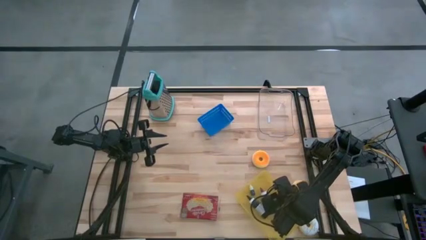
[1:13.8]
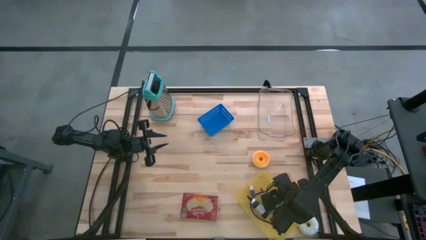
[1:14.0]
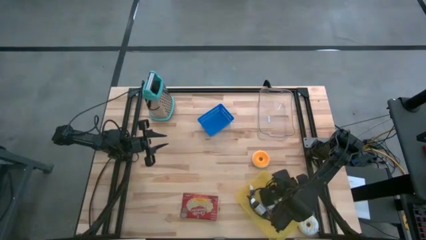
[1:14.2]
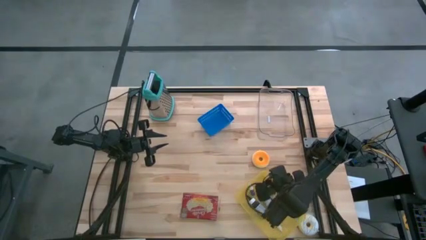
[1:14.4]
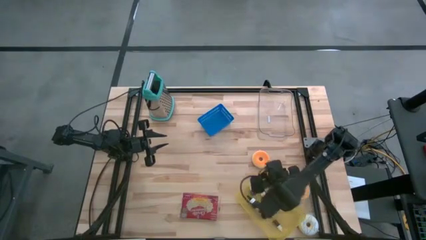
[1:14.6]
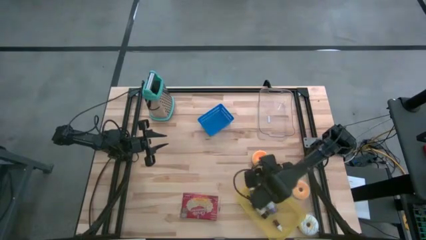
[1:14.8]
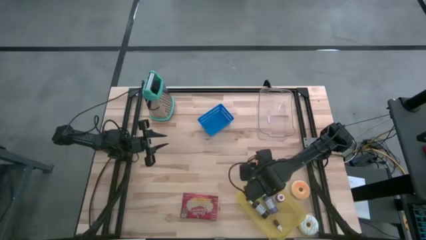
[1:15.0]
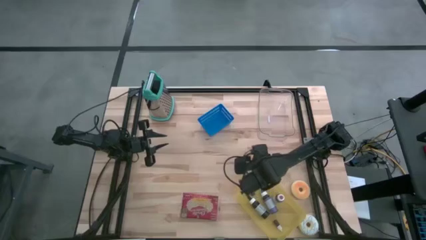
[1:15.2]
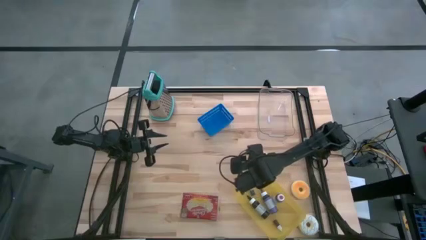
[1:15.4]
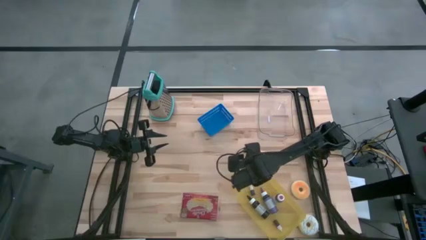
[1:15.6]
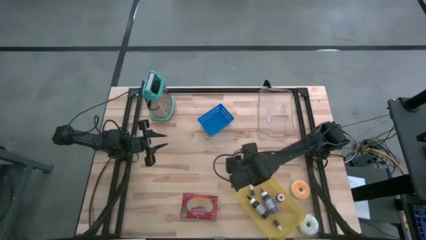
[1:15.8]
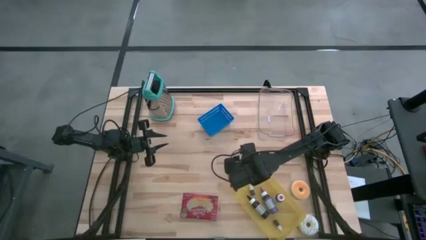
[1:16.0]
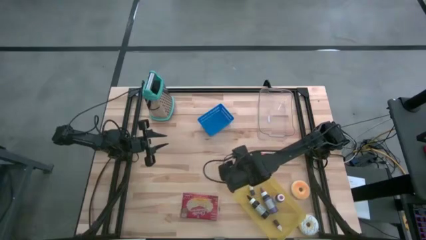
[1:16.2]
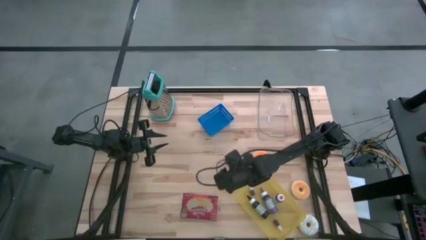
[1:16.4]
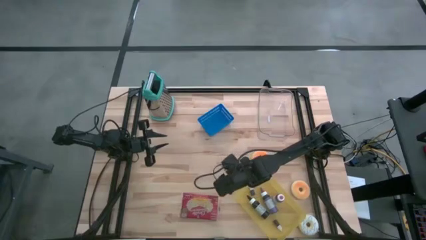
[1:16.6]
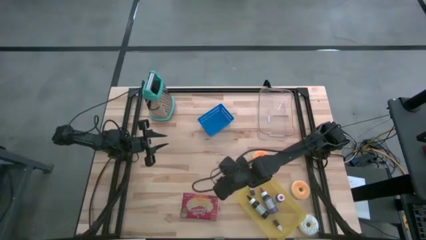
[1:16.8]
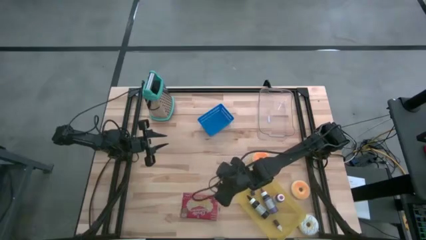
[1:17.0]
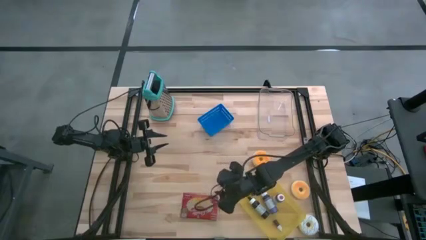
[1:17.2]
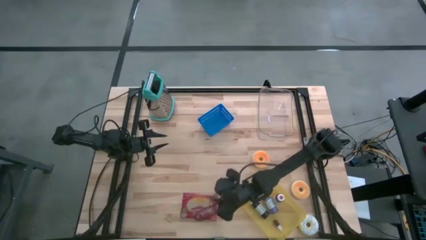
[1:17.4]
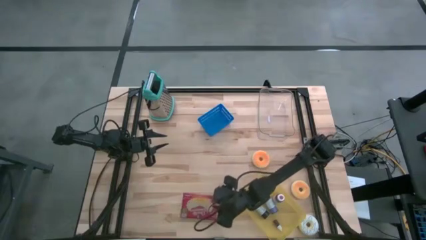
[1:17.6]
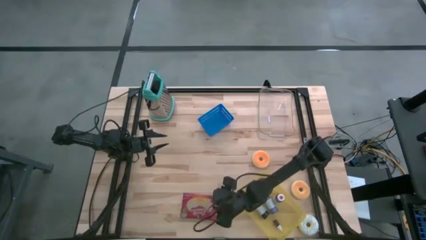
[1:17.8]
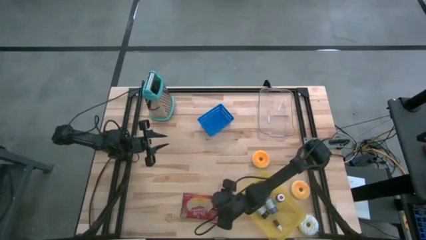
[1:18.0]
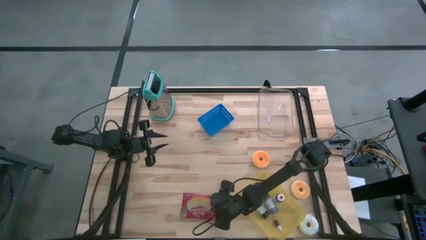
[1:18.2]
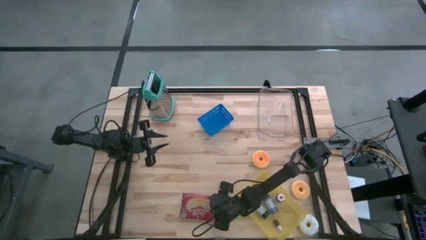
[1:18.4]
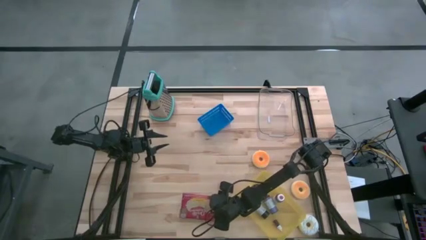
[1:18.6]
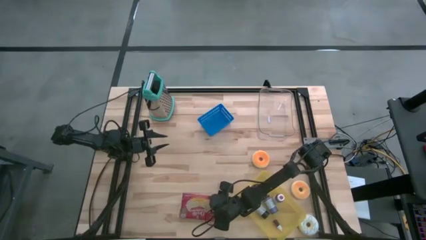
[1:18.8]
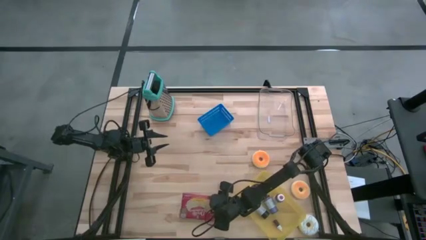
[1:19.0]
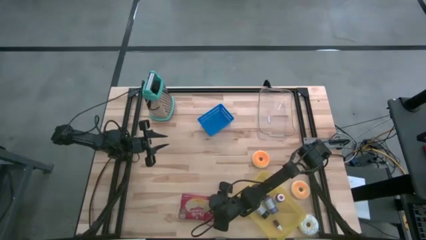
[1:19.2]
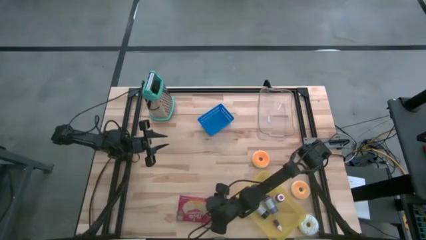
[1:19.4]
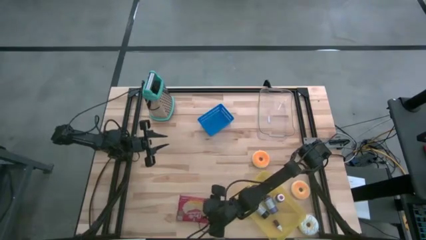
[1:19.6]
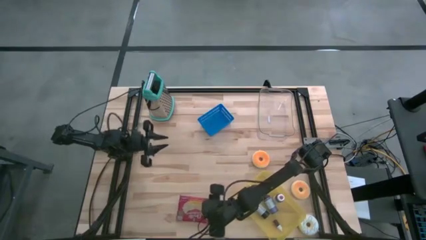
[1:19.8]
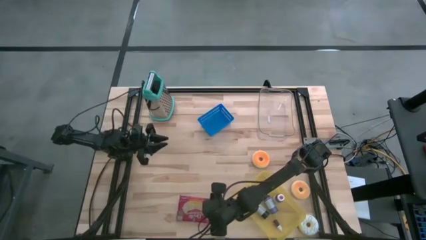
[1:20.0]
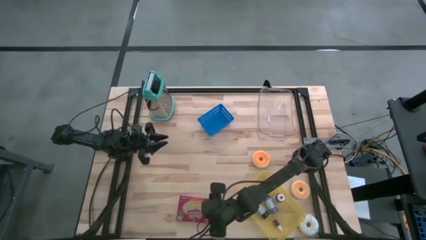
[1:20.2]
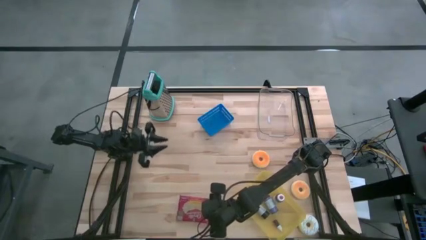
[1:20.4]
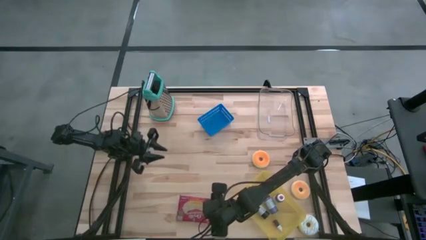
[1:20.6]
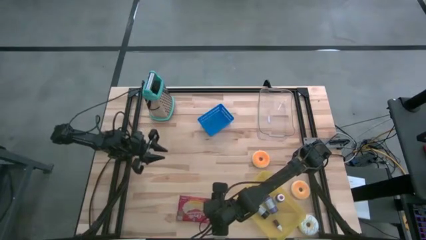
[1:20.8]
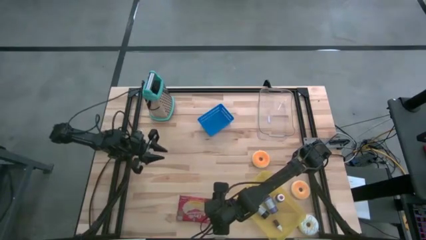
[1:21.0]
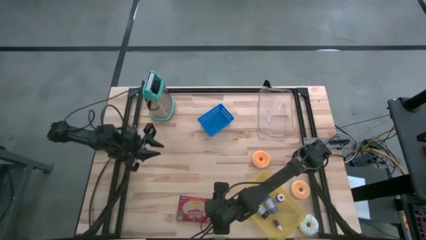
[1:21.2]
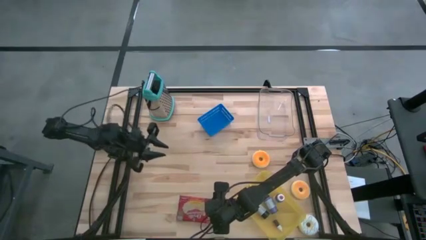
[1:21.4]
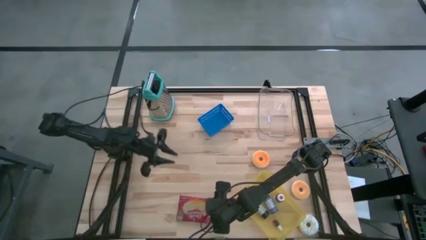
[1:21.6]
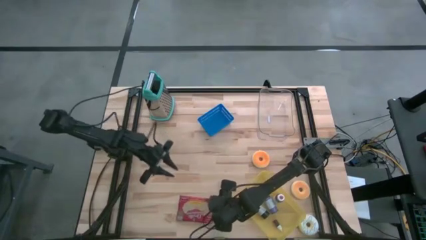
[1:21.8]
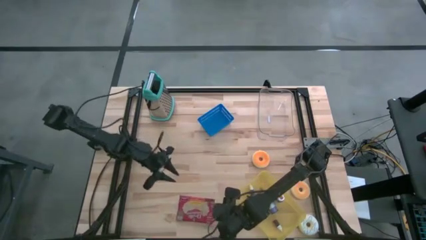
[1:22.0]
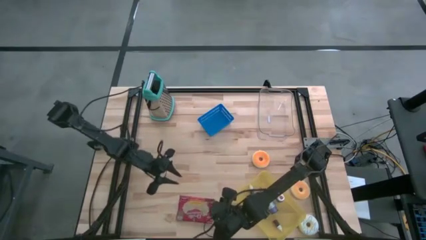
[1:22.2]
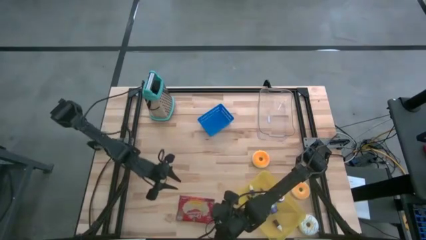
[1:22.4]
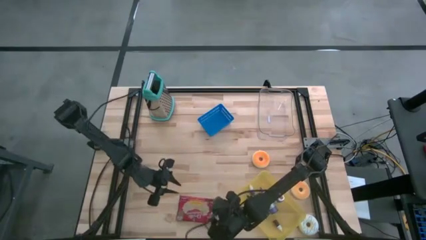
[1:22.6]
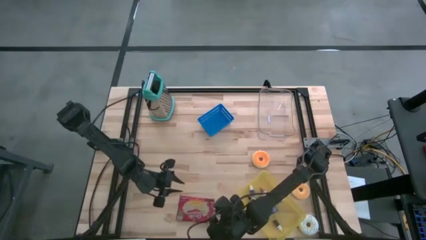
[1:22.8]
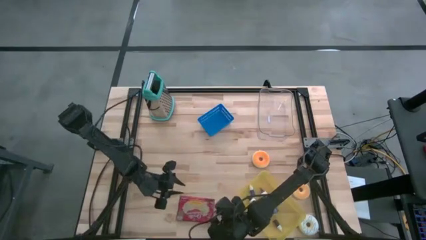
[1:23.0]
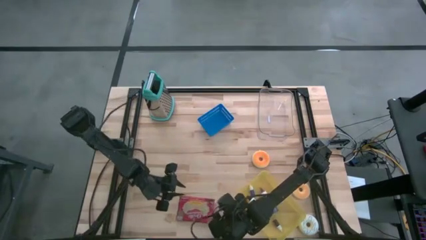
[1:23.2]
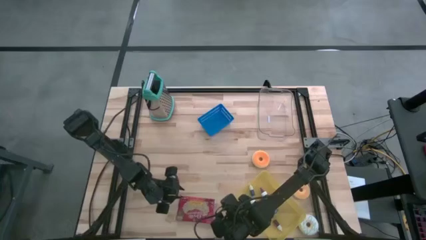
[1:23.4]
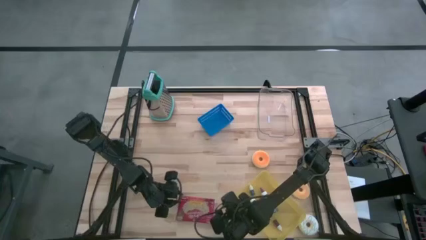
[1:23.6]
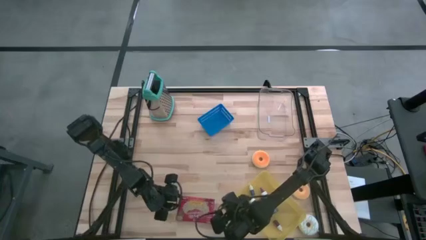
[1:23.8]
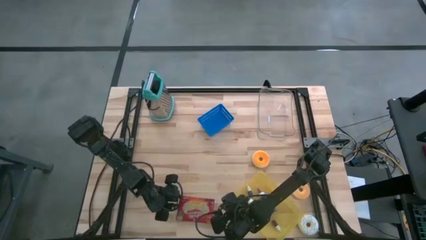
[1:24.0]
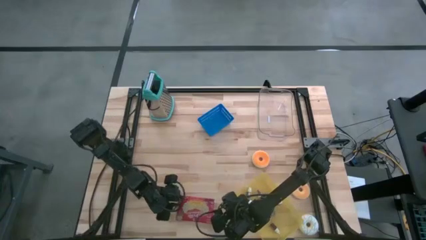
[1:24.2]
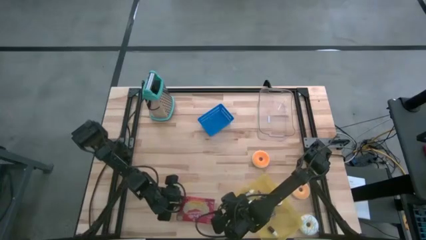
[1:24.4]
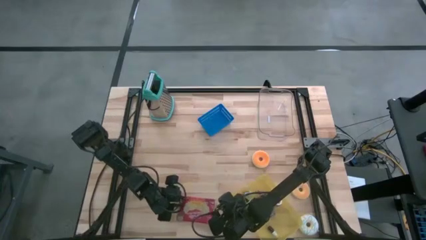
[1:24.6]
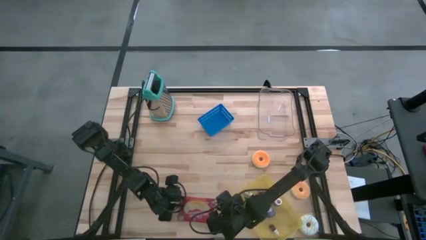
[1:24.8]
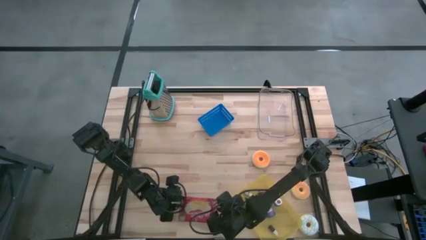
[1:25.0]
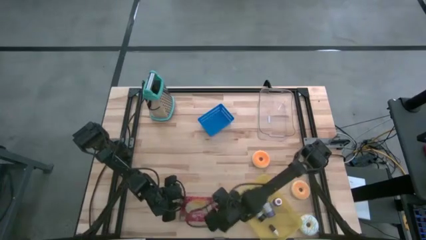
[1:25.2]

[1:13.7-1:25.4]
Task: Pick & Place Food Item
Put the popcorn butter into the transparent bin

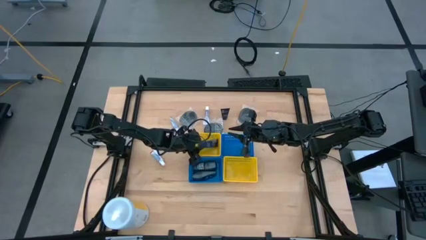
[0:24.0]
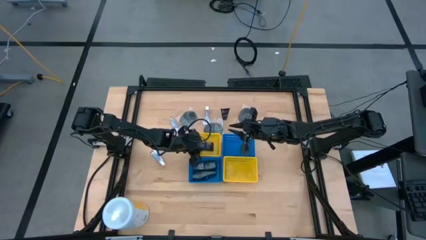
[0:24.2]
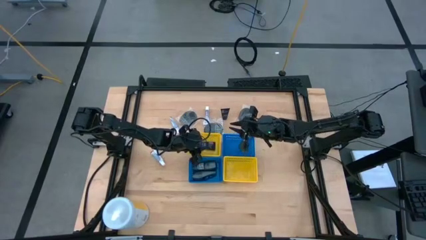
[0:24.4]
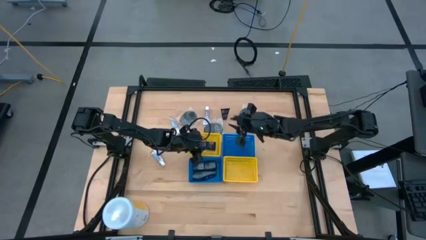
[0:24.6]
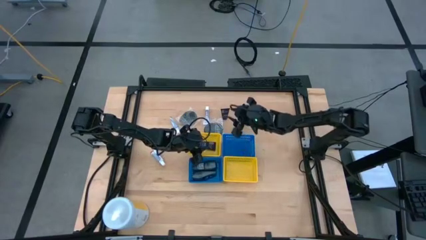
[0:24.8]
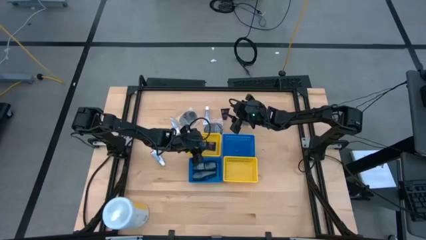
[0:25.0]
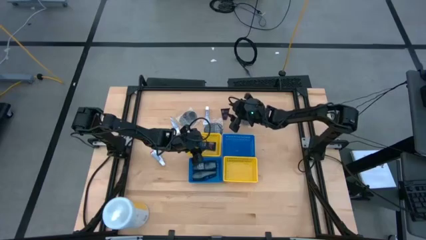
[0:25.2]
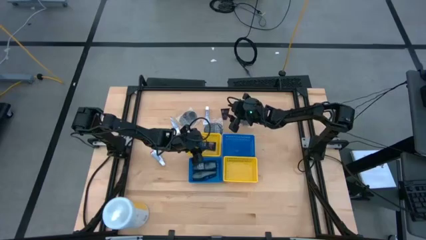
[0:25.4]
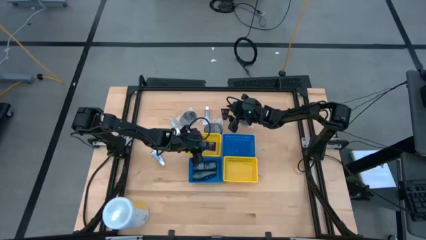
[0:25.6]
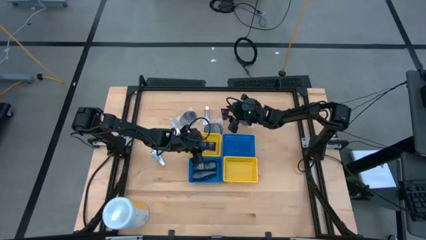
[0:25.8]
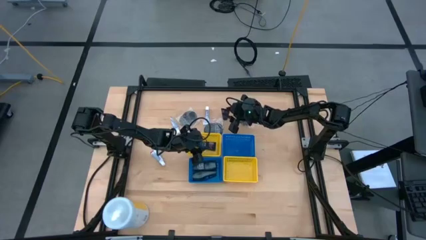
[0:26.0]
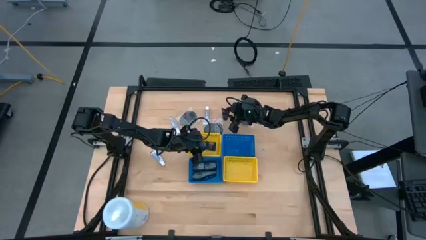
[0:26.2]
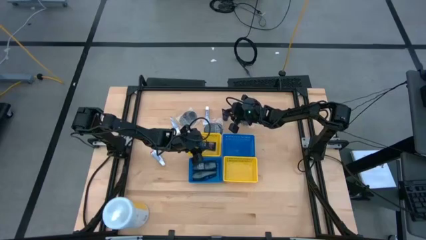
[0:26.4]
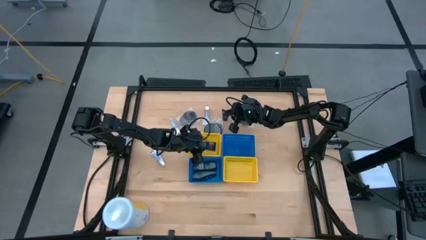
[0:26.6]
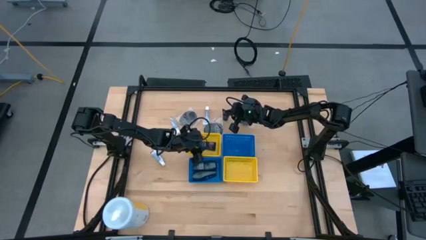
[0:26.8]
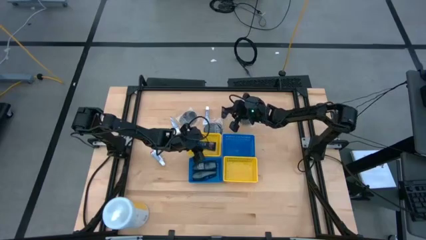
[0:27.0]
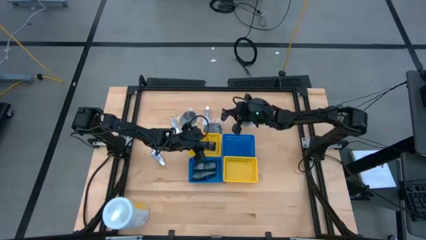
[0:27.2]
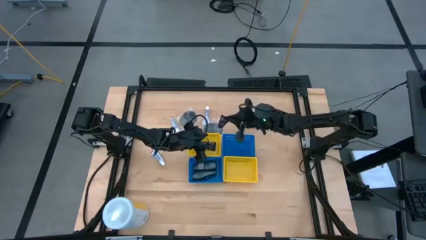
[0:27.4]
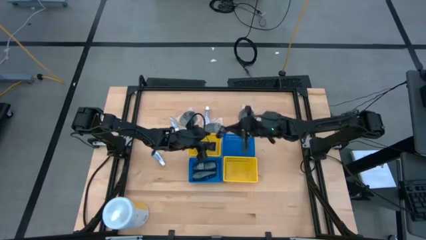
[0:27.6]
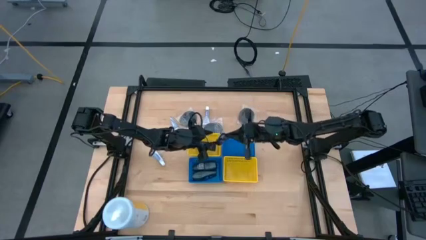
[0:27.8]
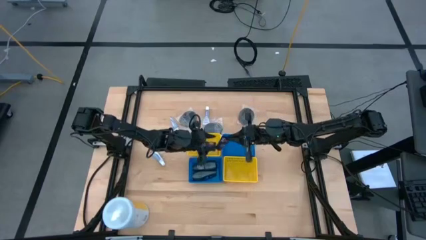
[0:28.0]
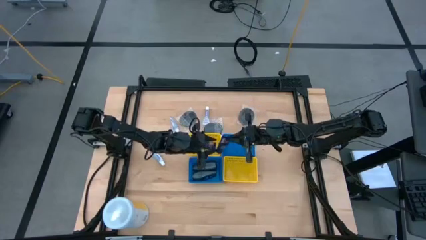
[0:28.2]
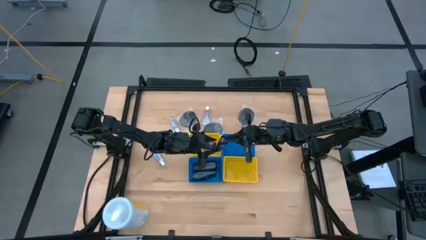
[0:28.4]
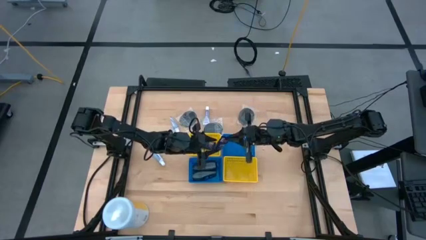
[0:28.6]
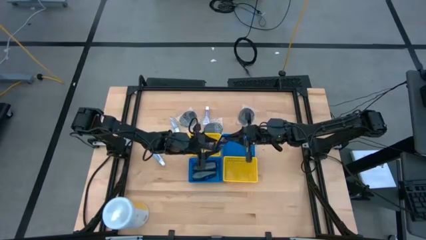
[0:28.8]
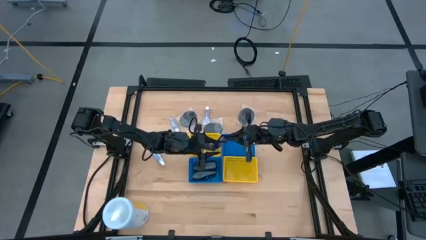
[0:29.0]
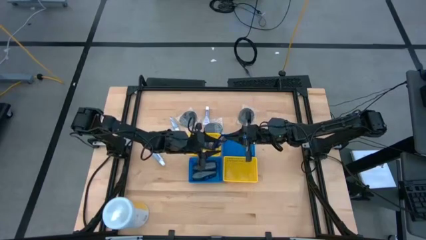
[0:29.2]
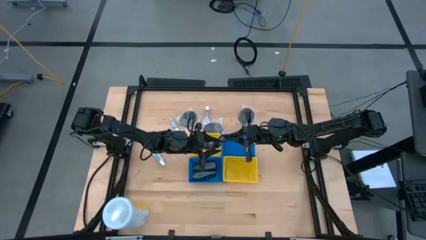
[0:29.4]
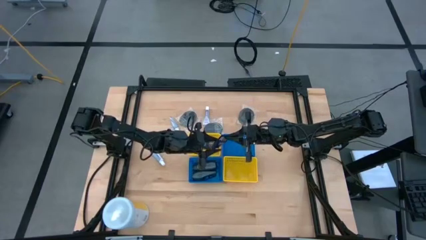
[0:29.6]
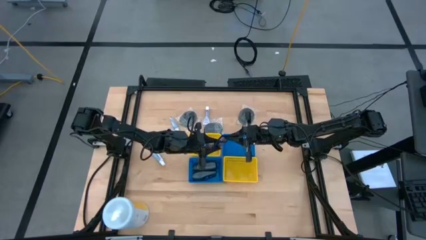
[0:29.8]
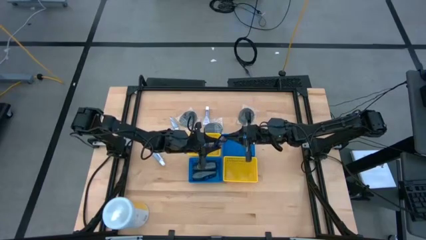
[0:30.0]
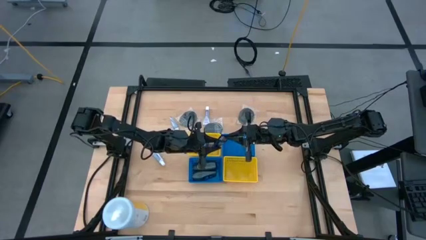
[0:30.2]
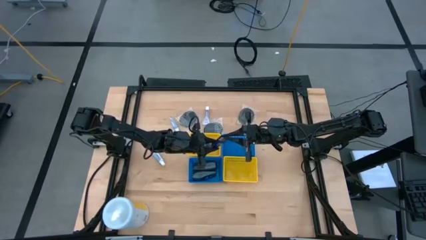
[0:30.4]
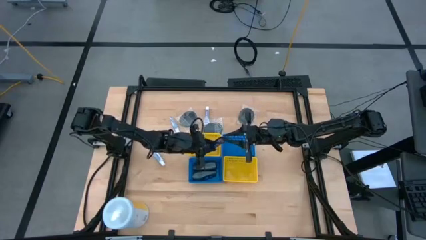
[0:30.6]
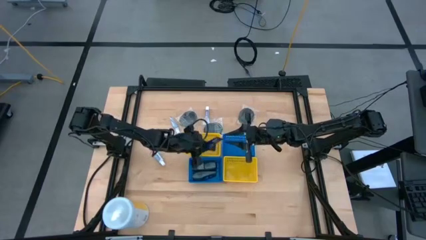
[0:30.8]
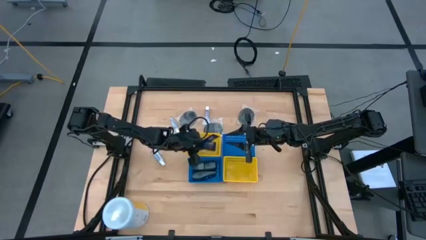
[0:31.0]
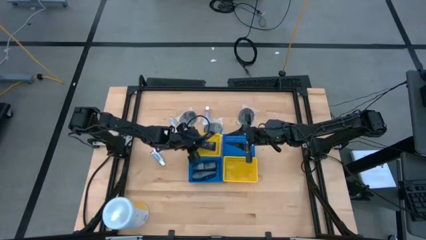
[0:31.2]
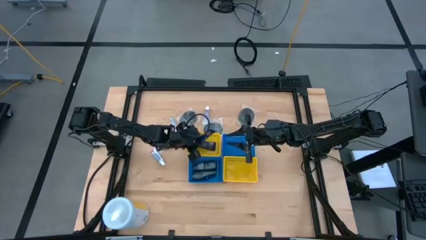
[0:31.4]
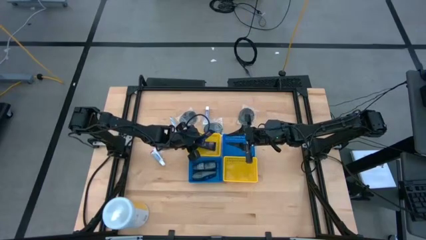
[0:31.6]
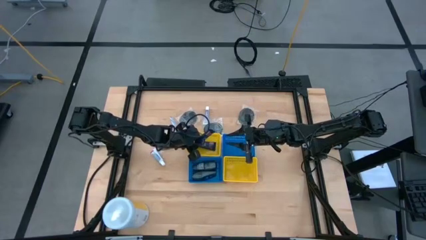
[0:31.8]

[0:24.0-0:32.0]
Task: Pick & Place Travel size toiletries
Put the blue shave cream into the left yellow bin
